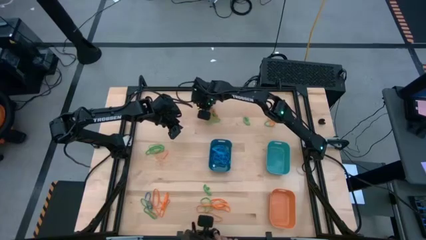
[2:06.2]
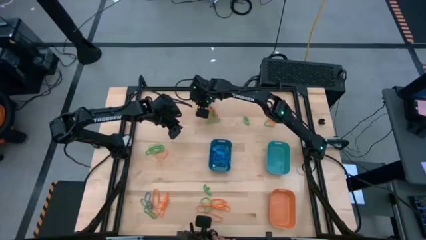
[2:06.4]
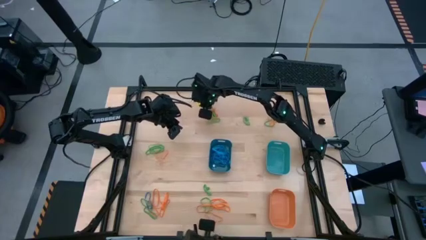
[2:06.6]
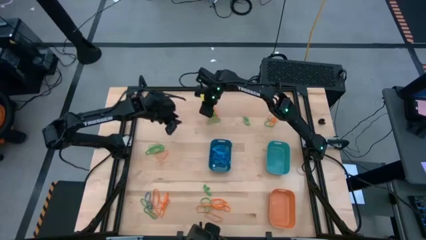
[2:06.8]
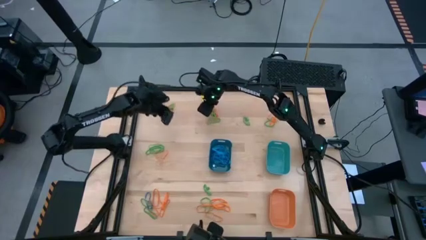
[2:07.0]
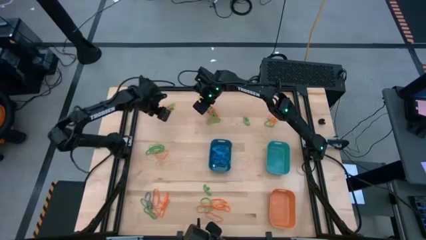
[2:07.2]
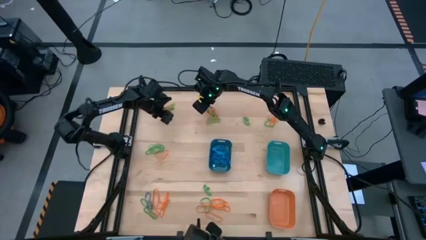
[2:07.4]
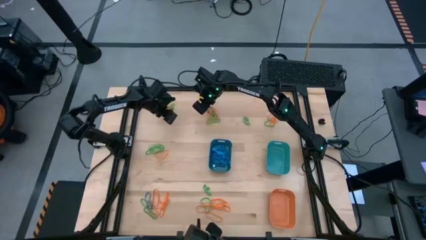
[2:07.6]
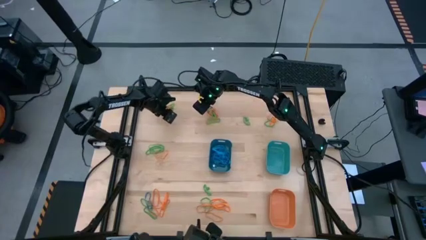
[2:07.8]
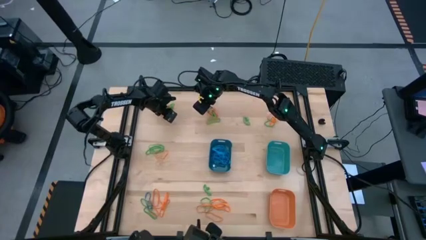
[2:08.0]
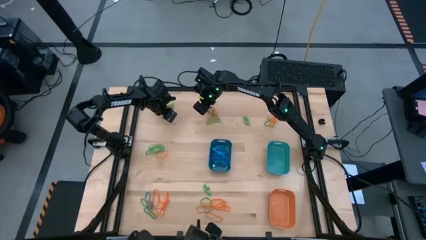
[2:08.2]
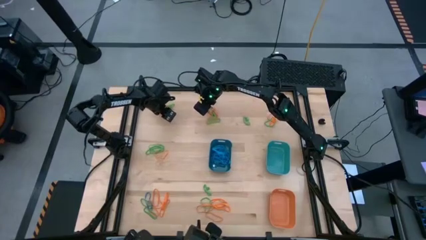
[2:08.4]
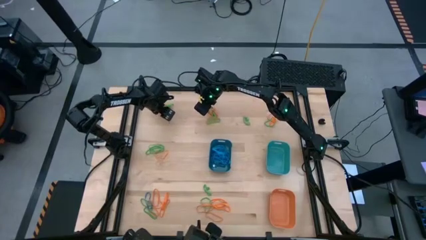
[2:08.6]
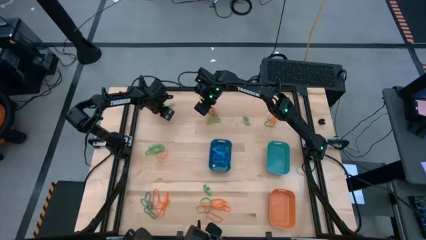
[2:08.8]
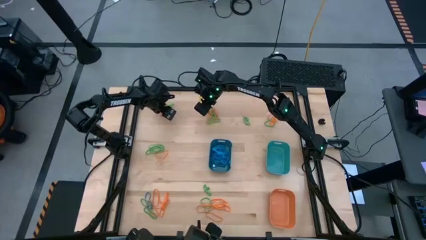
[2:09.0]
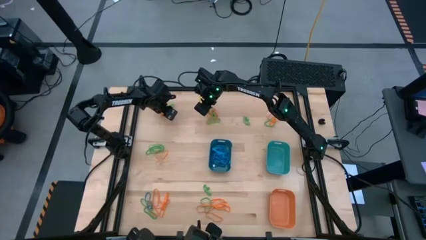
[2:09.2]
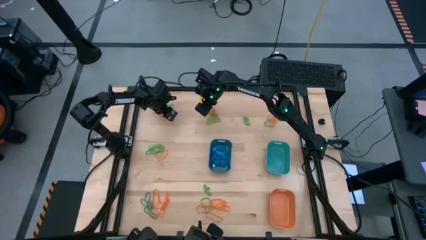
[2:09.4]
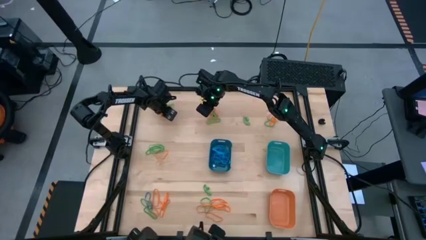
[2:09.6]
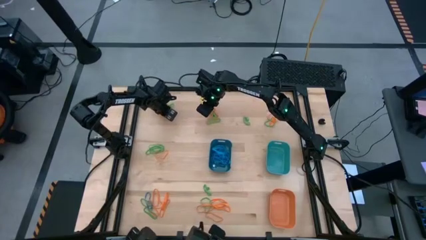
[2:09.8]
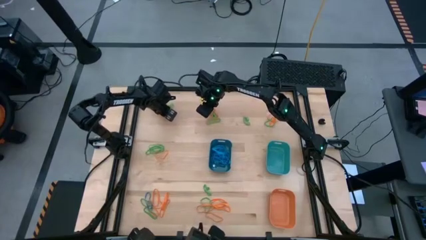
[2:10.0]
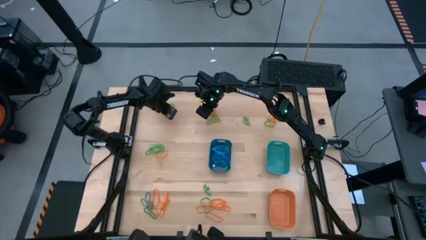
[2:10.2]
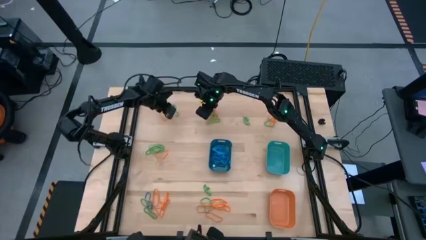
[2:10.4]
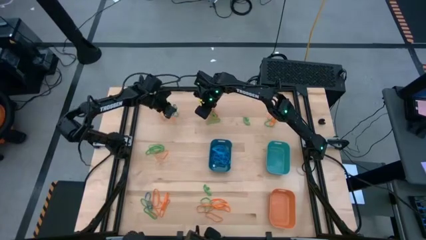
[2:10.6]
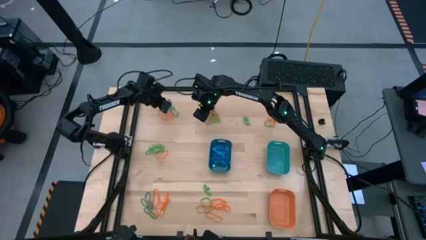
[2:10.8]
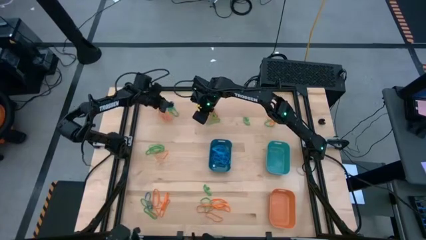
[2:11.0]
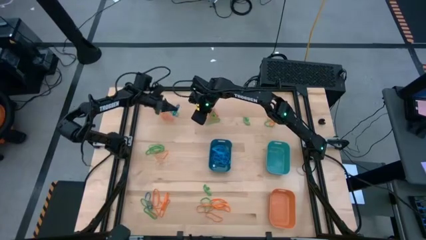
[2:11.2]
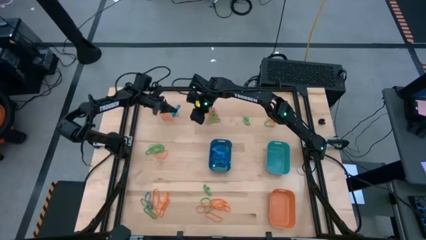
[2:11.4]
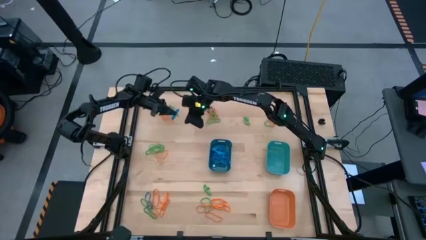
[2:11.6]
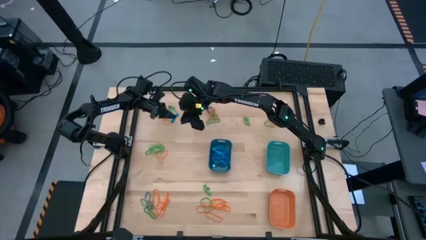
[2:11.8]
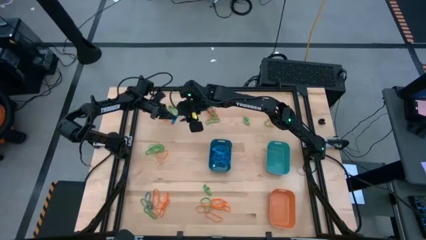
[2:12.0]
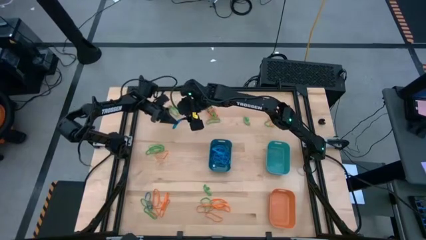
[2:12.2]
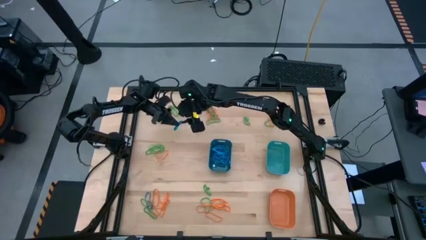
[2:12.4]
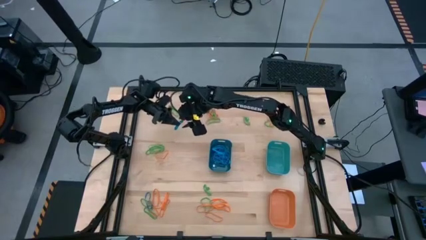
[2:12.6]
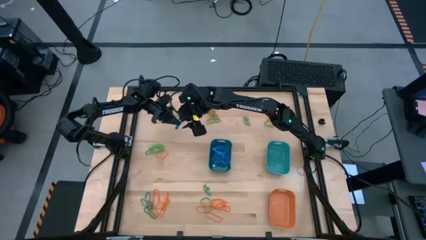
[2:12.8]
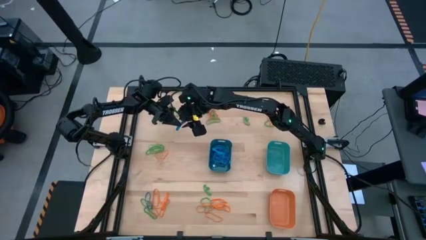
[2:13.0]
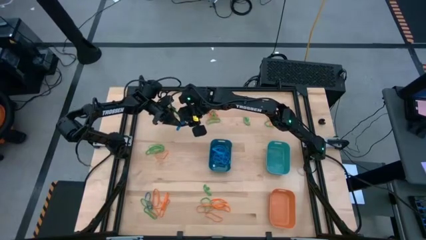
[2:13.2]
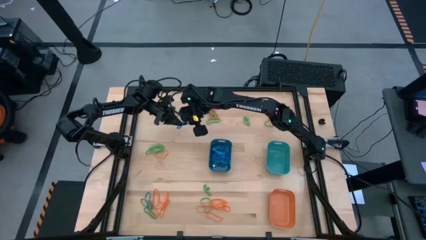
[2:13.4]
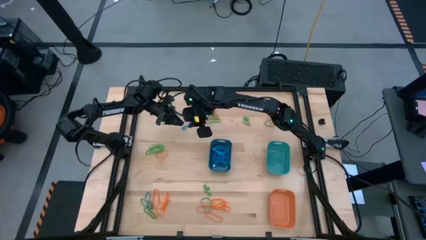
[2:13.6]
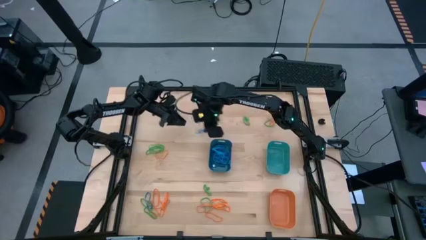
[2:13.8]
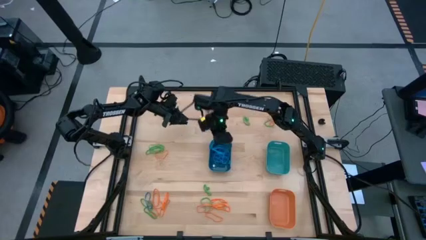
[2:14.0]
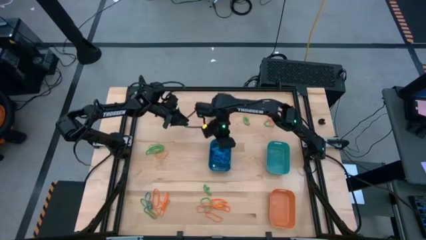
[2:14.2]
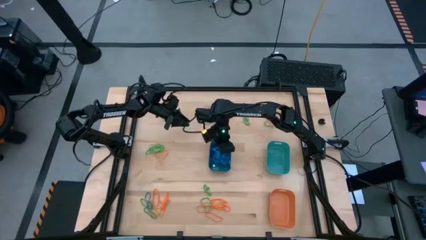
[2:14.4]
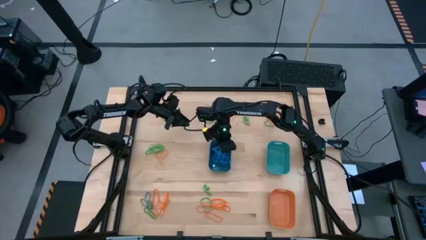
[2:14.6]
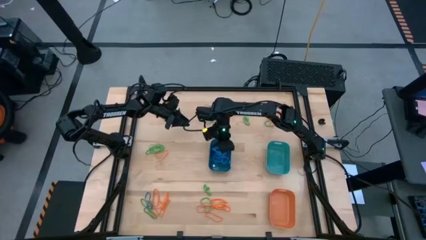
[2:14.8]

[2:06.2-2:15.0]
Task: Sort rubber bands into baskets
Put the blue rubberband into the blue bin

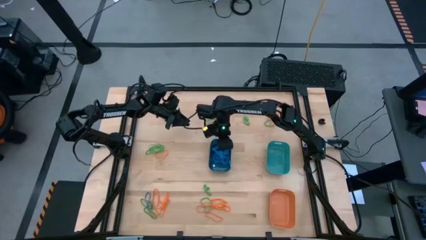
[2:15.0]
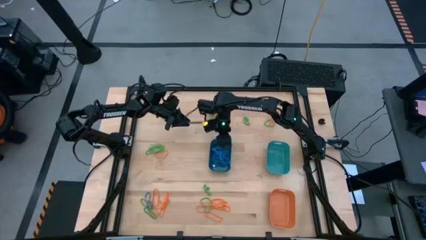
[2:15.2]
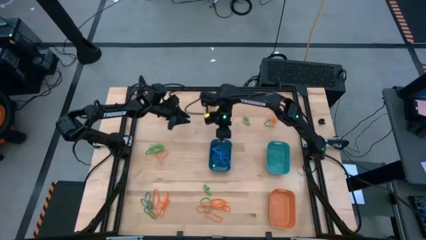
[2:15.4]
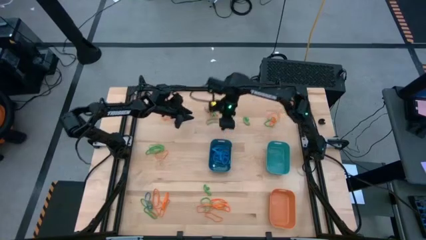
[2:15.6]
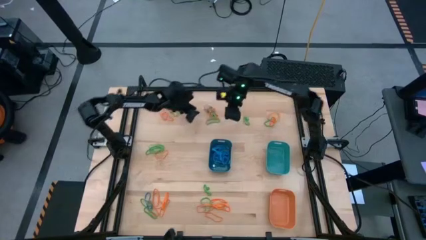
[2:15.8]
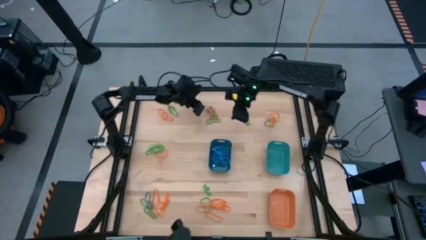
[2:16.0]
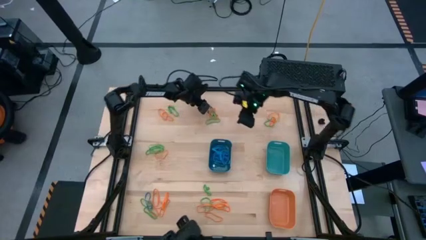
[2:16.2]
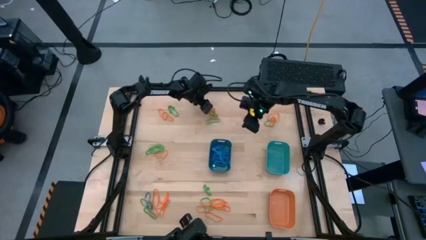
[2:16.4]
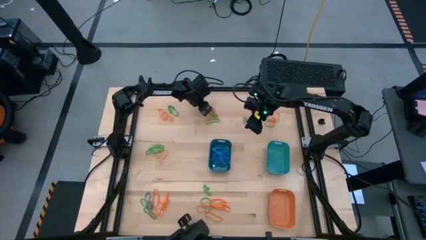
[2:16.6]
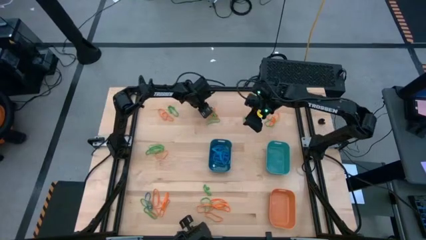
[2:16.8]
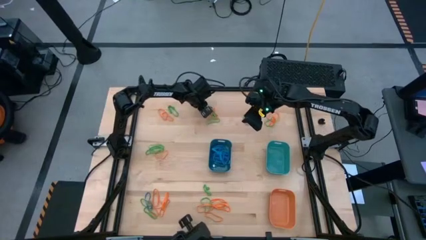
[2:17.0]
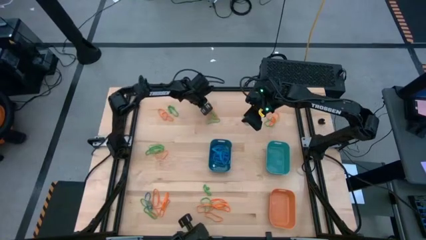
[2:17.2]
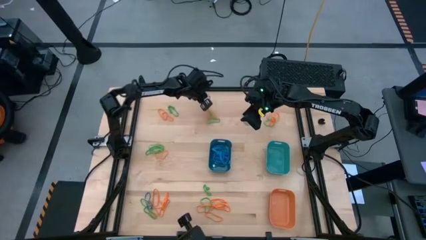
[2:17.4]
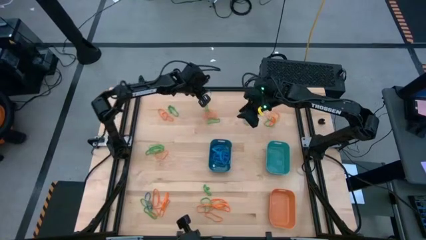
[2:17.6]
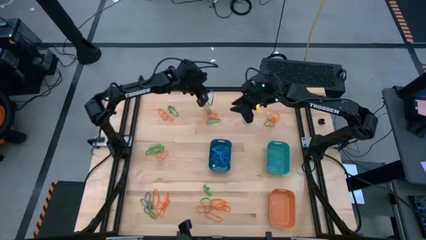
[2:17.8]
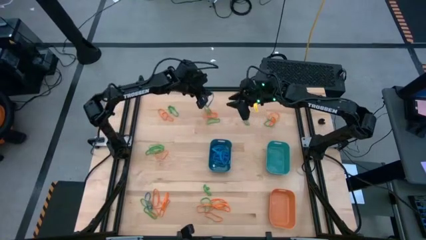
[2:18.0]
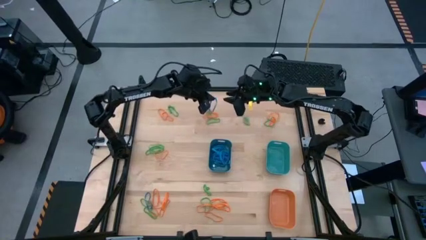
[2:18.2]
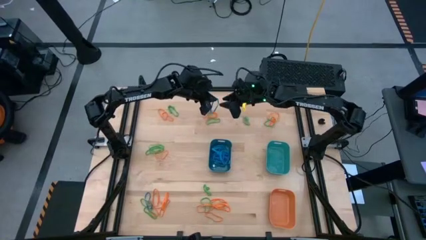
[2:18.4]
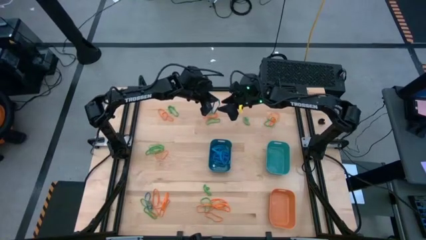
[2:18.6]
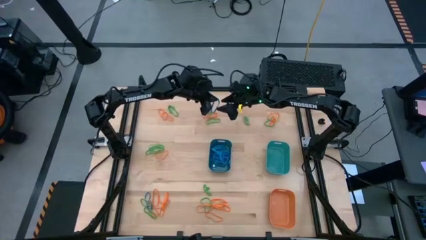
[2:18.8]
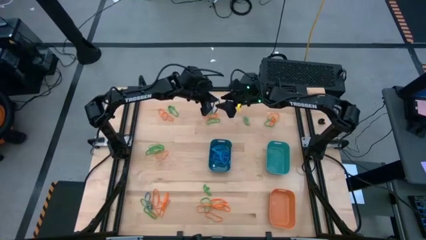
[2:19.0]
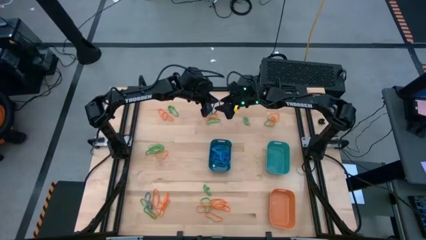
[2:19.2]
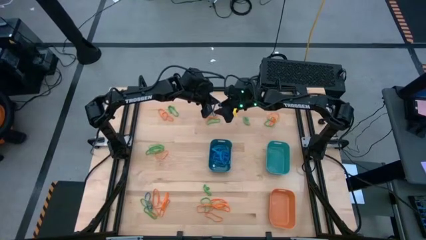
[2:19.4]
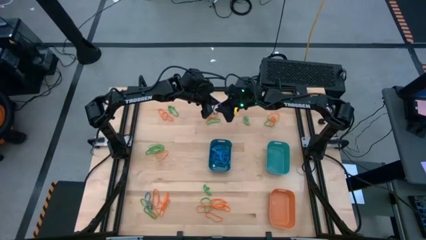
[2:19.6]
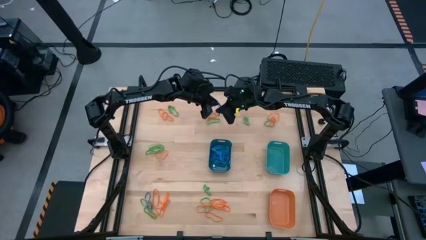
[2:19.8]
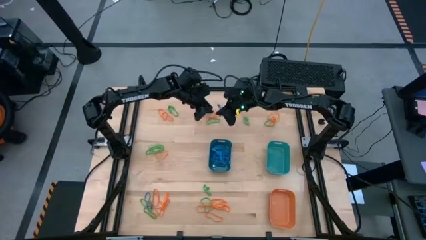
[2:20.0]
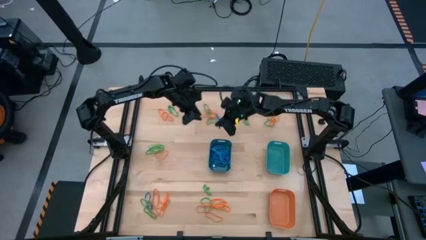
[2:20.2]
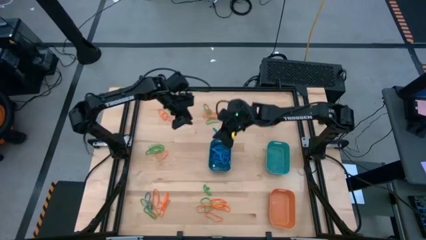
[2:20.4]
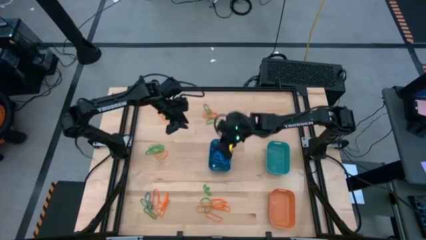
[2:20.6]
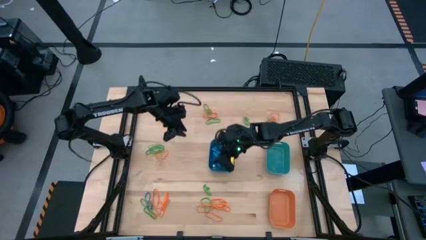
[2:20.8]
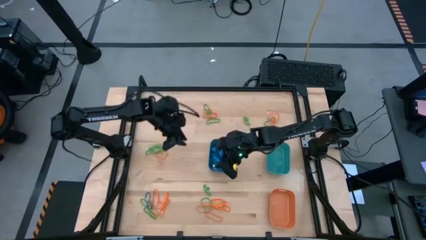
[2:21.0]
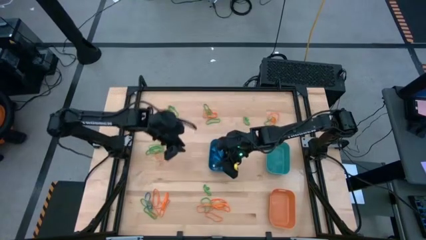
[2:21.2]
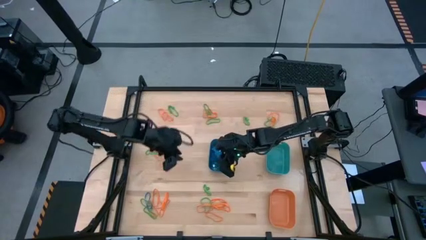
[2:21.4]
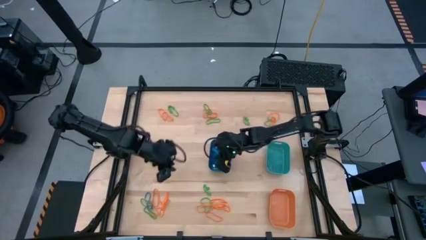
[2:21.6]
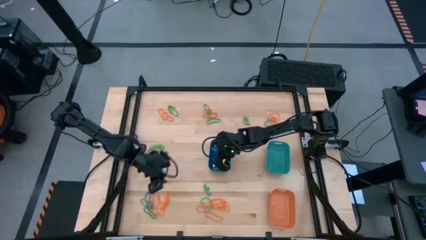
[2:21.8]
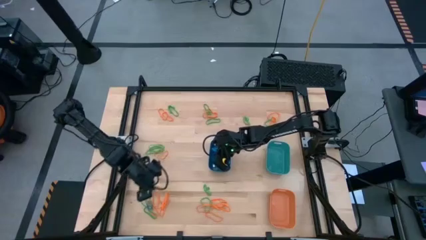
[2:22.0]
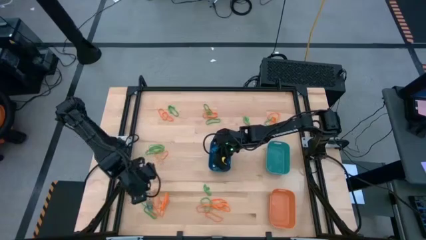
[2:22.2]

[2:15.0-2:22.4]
Put the blue rubberband into the blue bin
